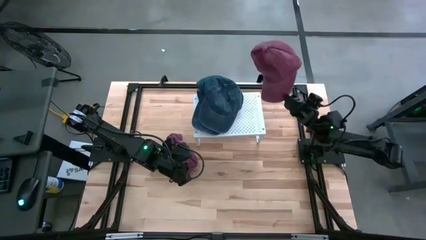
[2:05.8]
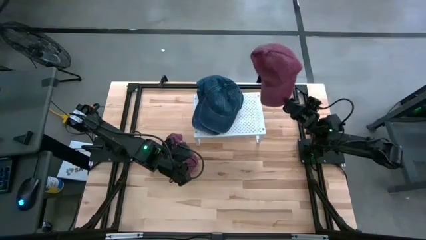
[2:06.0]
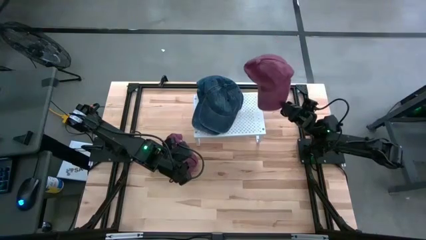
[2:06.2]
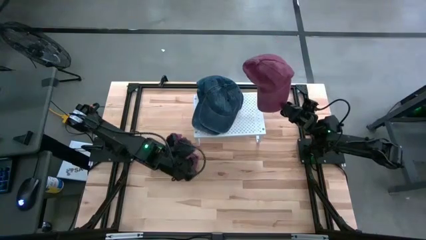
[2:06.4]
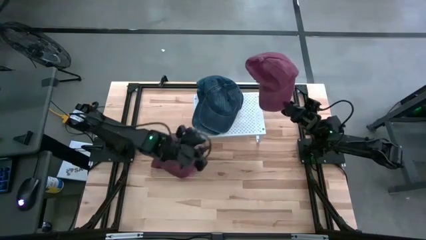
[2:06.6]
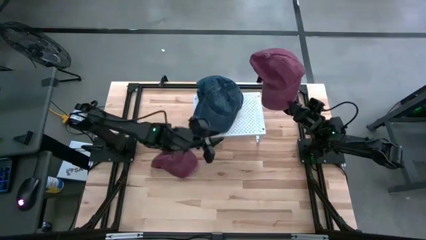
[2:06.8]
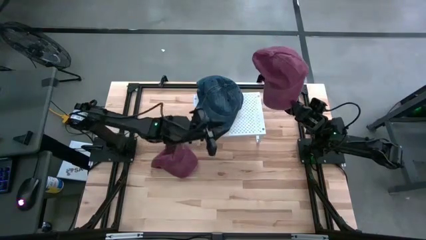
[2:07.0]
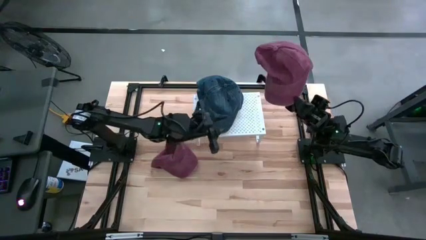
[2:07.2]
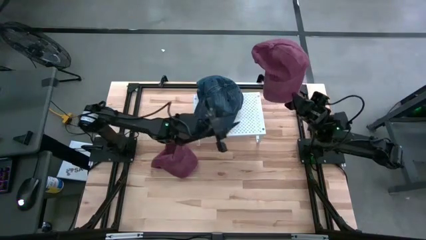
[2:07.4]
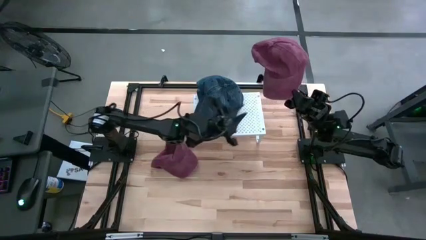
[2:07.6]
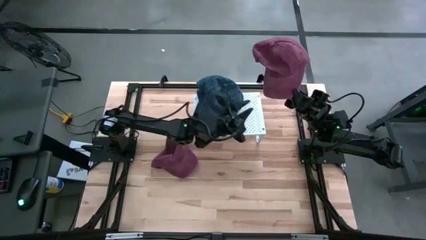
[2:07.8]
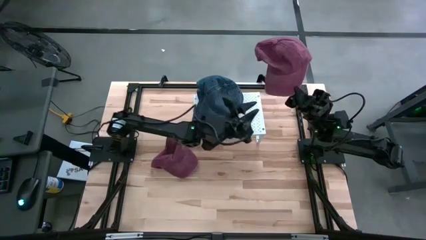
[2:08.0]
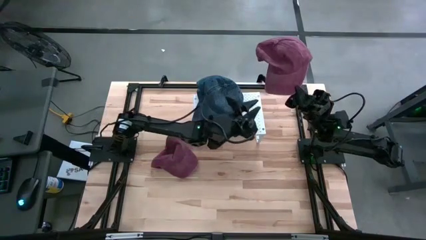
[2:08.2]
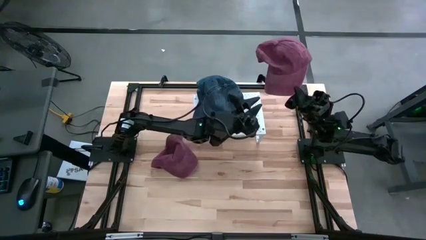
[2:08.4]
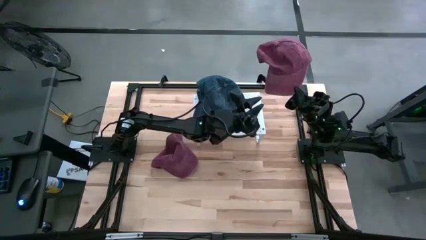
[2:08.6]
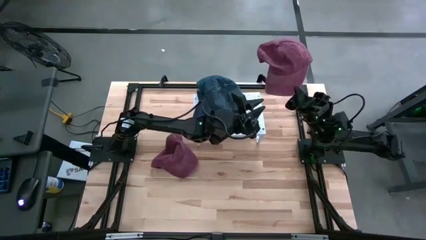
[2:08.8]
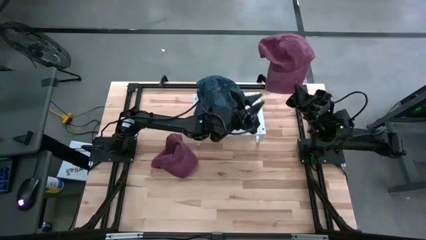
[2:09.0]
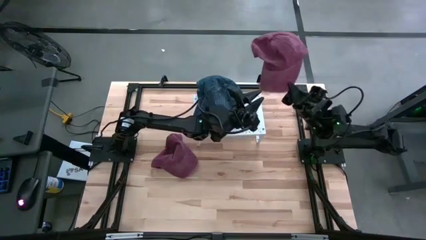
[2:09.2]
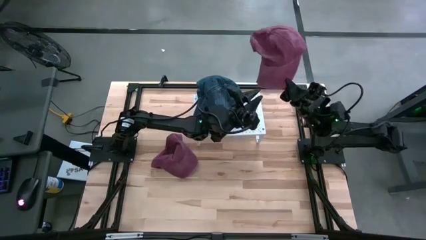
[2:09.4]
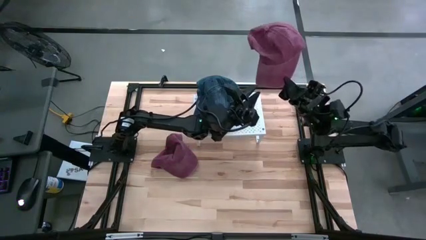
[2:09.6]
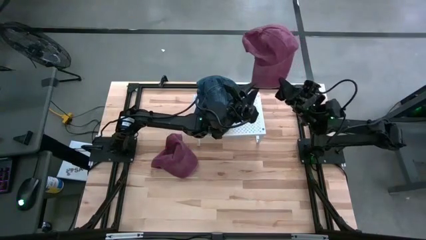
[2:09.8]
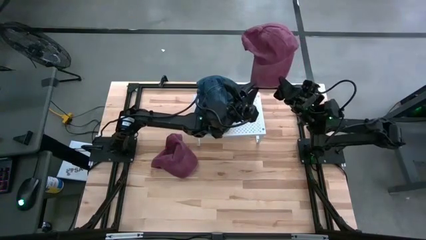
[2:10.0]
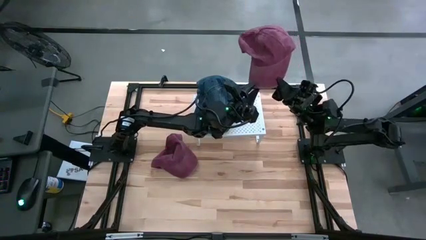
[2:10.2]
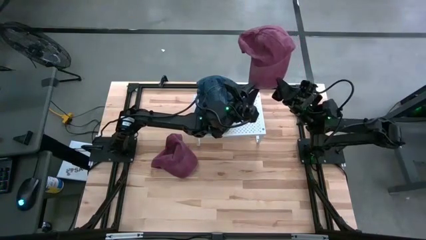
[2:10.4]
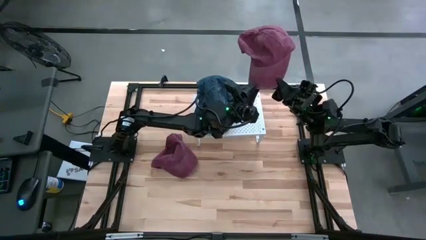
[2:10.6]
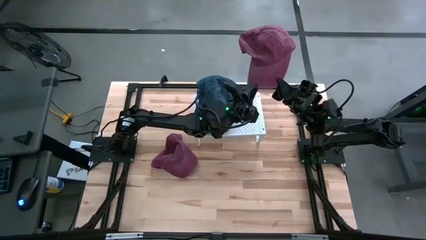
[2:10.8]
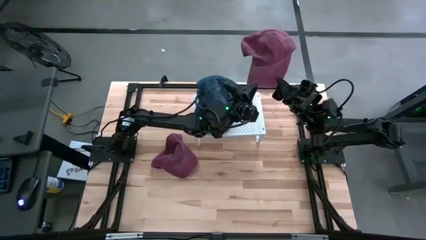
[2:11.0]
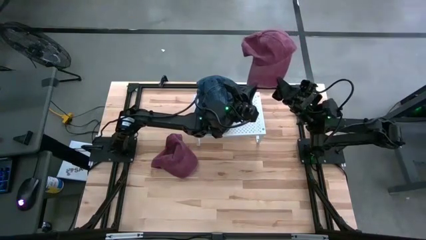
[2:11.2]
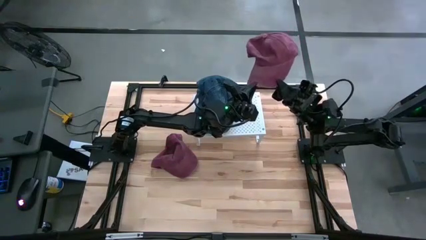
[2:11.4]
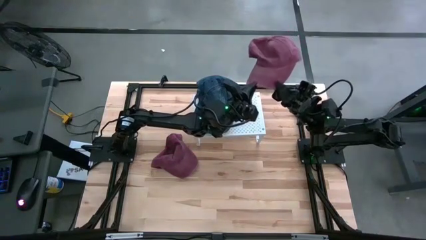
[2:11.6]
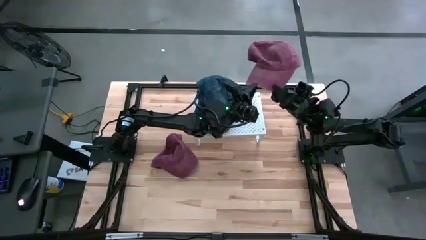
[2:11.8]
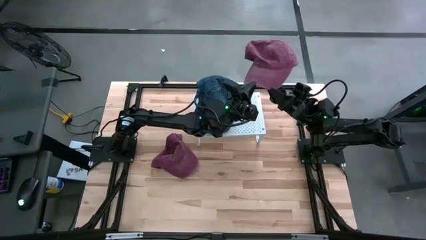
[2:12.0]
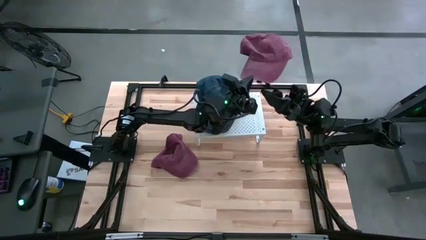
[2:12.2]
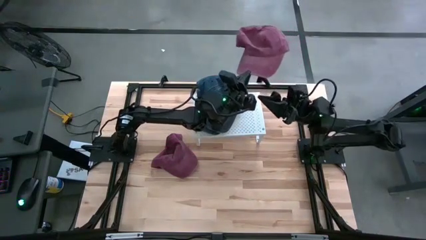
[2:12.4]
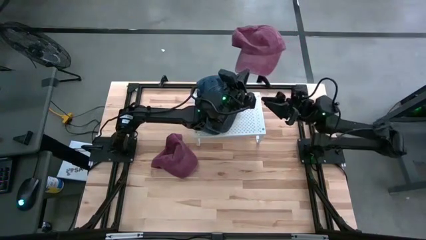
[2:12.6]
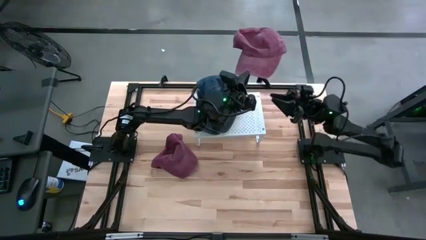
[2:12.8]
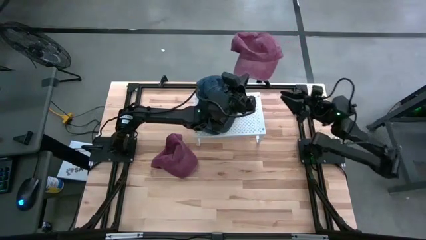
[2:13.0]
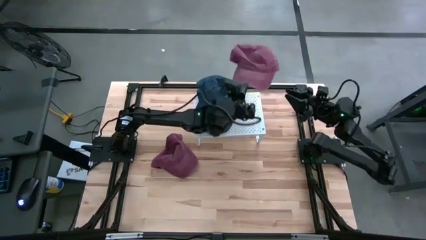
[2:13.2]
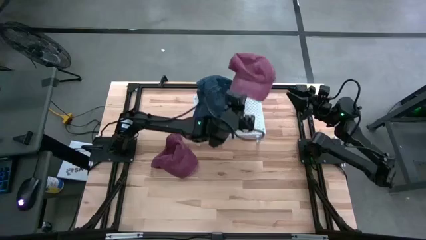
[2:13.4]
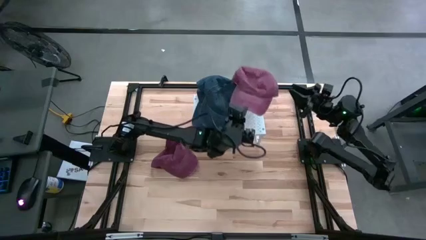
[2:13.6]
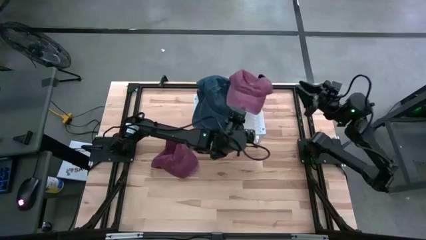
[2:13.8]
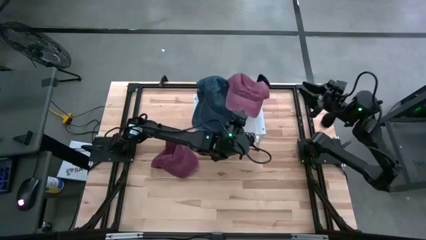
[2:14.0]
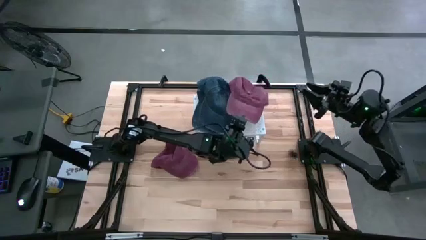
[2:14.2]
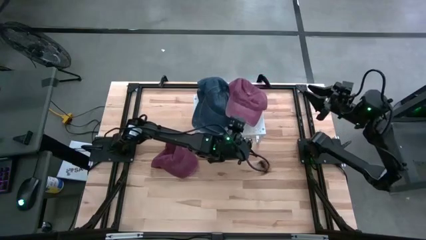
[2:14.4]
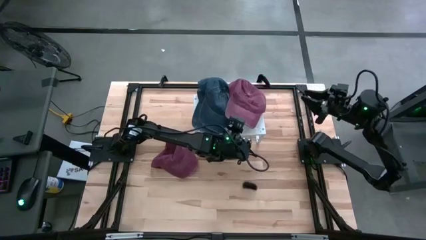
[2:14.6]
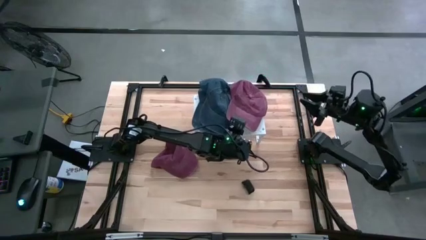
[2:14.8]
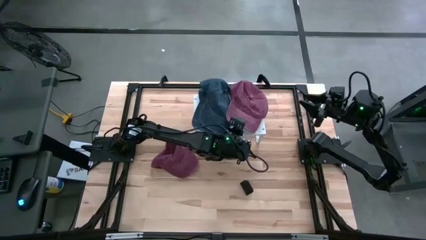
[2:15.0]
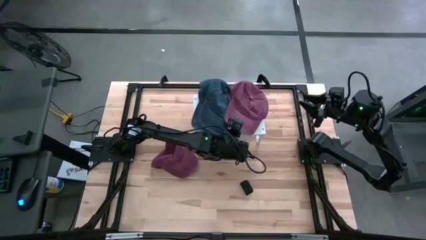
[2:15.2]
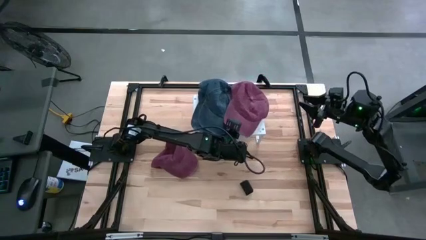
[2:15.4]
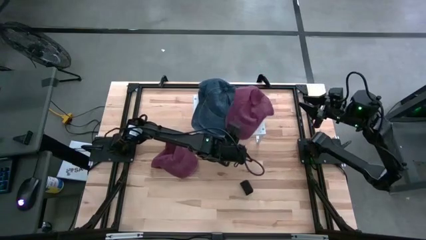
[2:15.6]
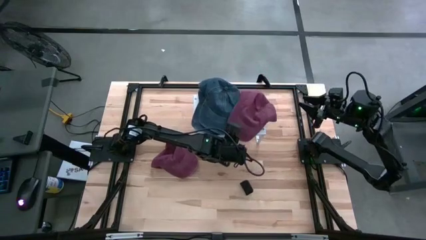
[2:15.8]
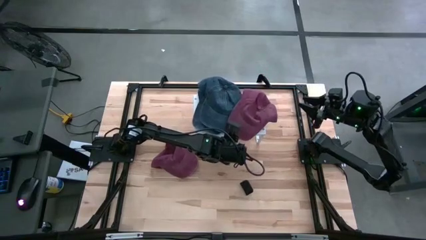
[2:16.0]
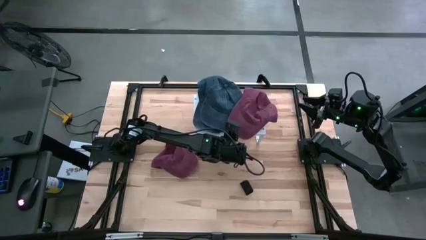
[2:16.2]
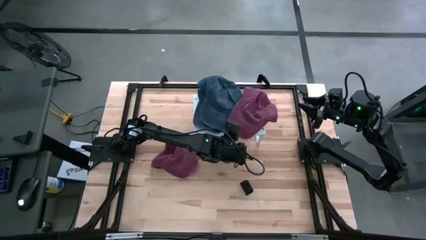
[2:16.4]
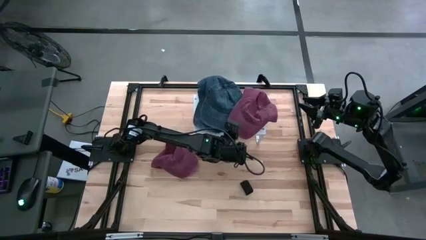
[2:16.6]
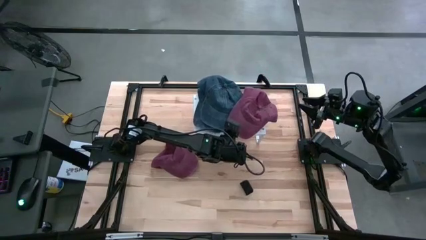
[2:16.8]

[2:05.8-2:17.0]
Task: Pick & Place hat
Put the right red cap on the shelf
